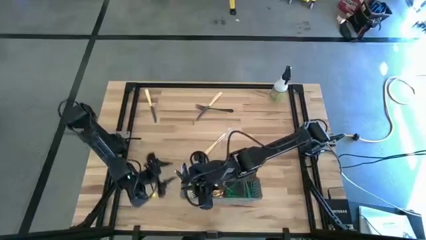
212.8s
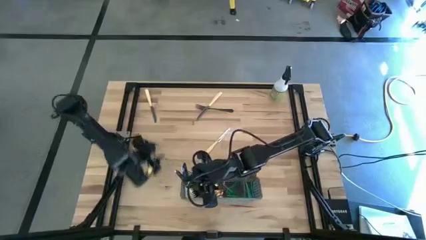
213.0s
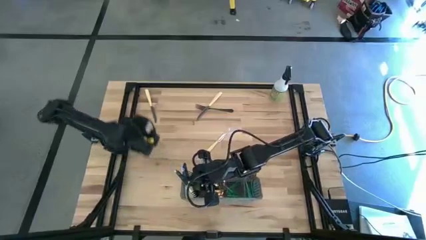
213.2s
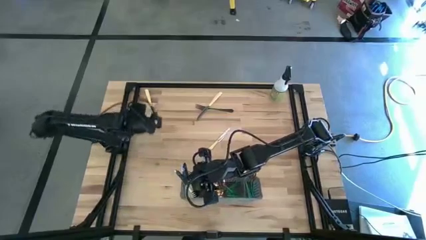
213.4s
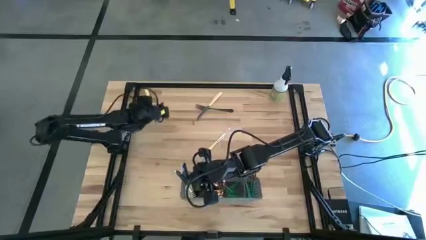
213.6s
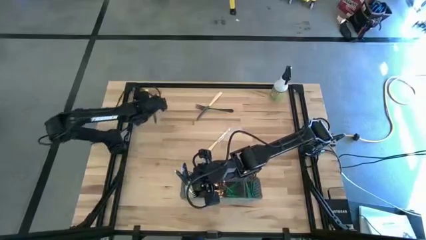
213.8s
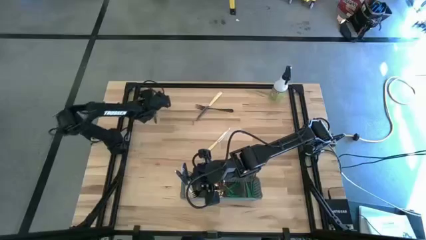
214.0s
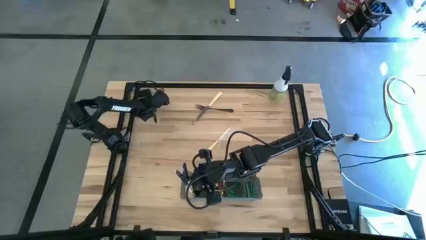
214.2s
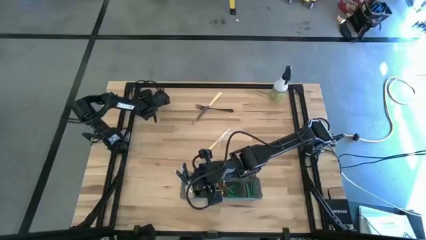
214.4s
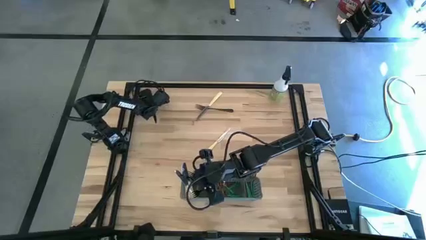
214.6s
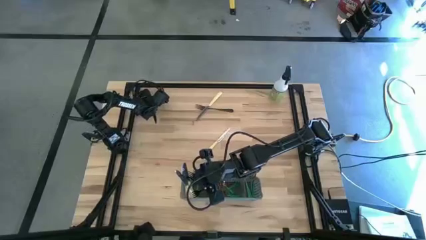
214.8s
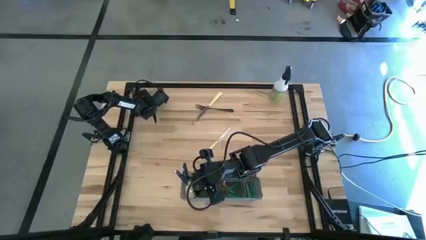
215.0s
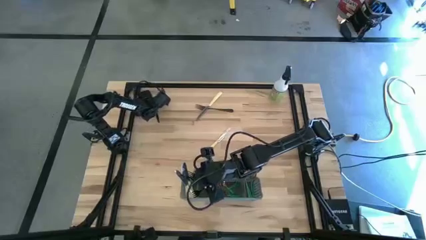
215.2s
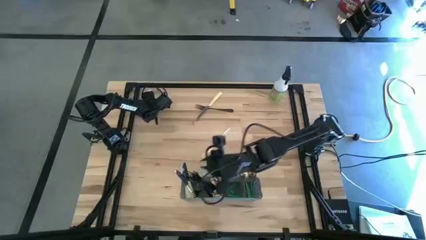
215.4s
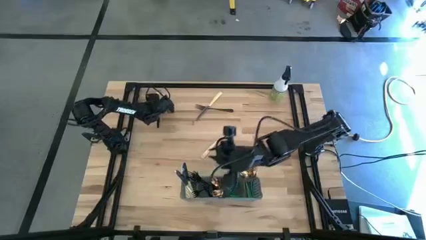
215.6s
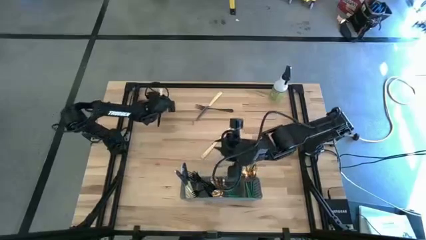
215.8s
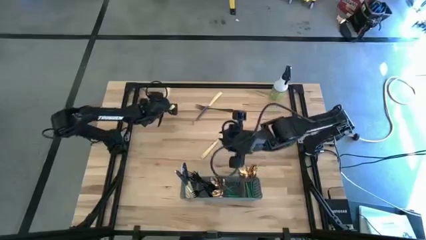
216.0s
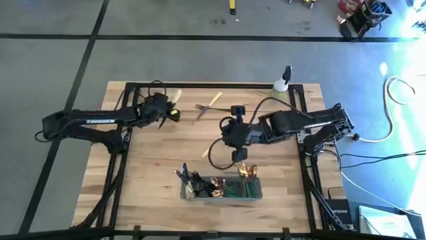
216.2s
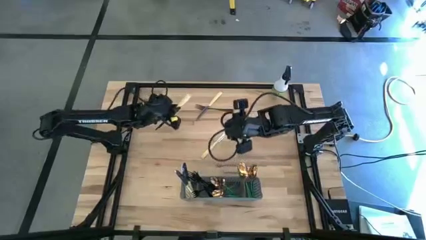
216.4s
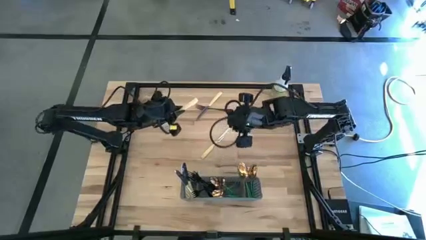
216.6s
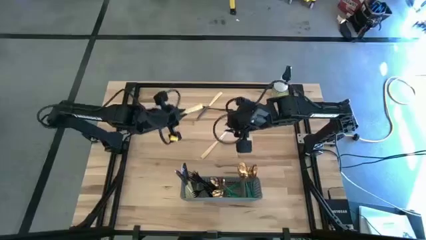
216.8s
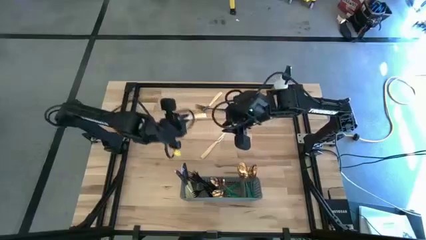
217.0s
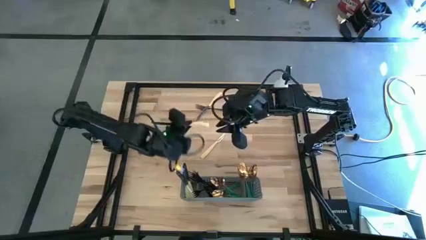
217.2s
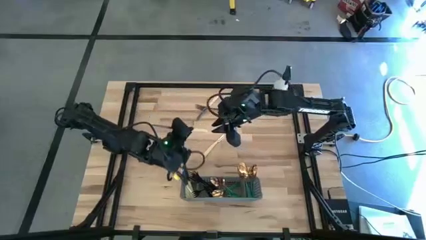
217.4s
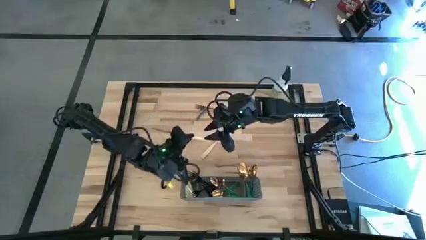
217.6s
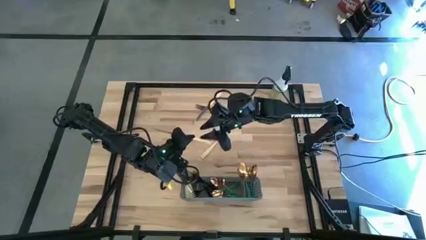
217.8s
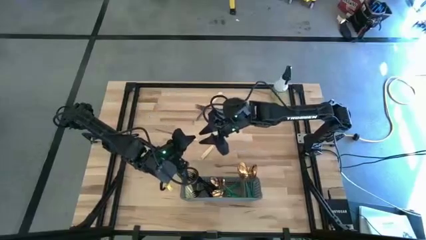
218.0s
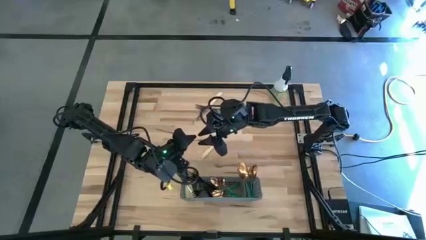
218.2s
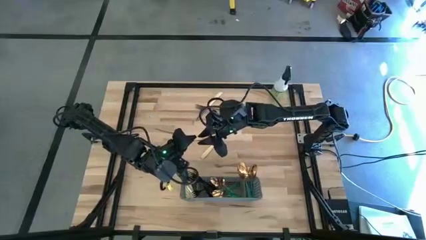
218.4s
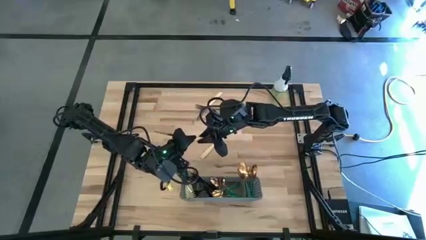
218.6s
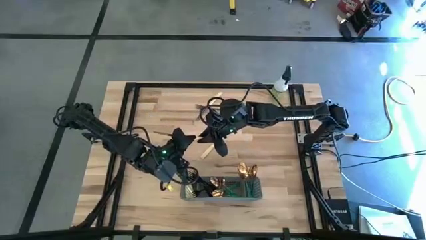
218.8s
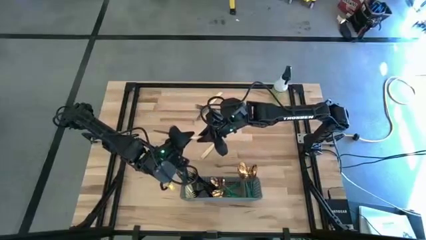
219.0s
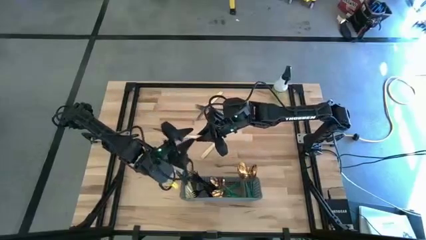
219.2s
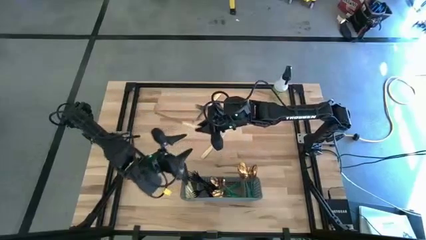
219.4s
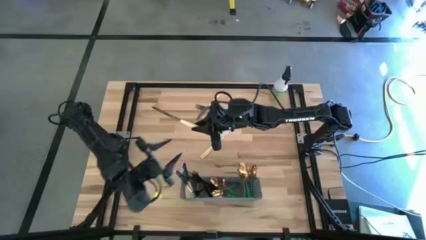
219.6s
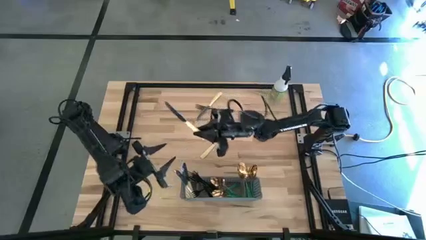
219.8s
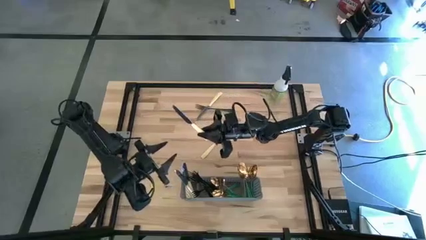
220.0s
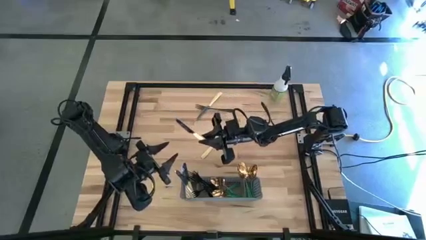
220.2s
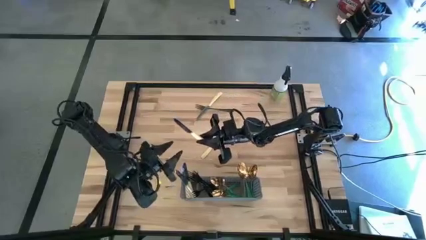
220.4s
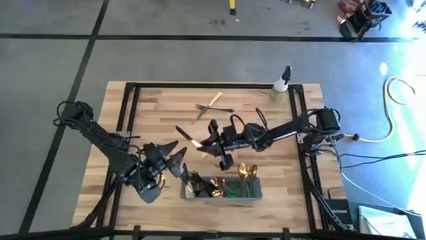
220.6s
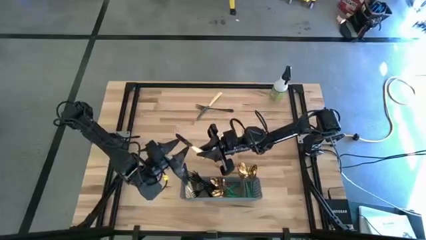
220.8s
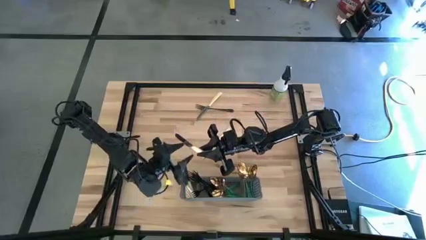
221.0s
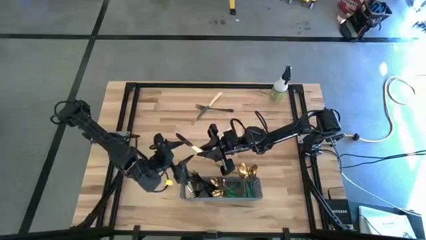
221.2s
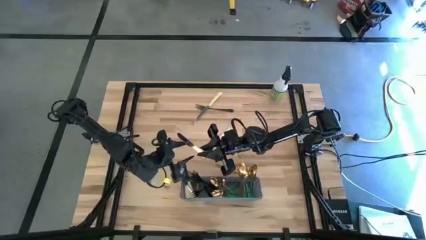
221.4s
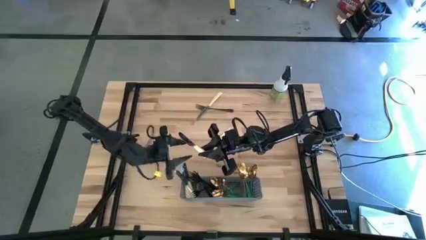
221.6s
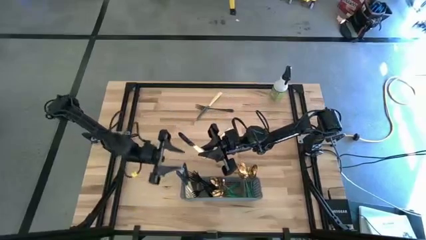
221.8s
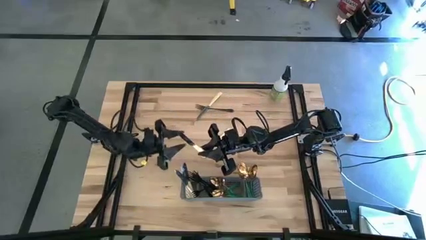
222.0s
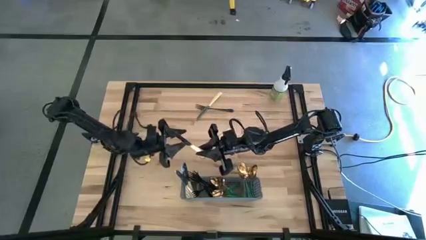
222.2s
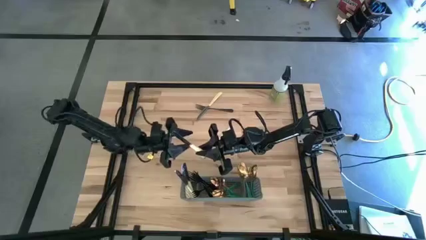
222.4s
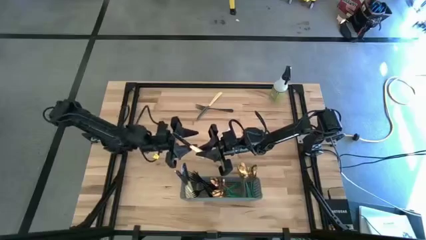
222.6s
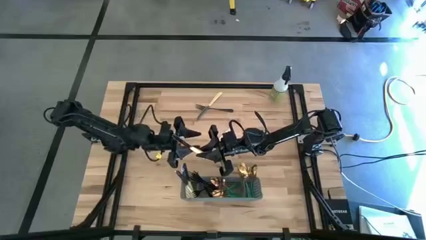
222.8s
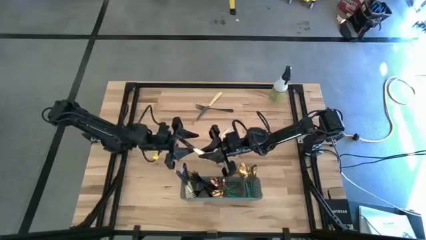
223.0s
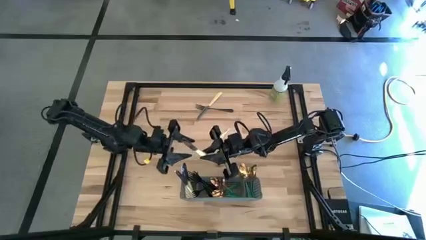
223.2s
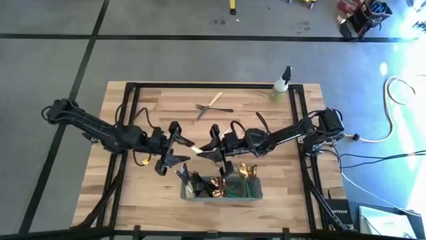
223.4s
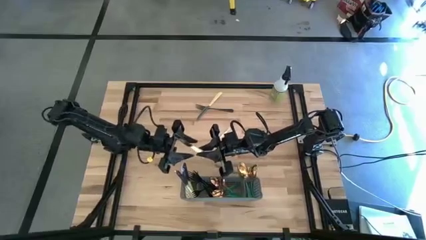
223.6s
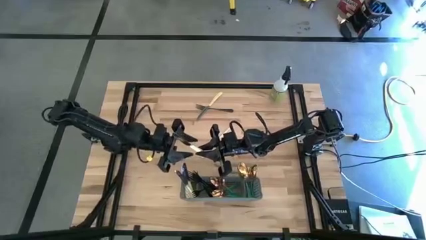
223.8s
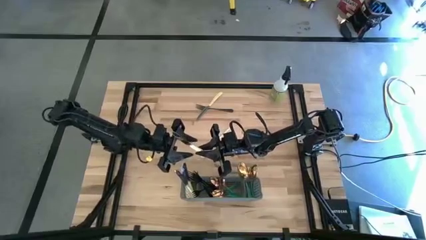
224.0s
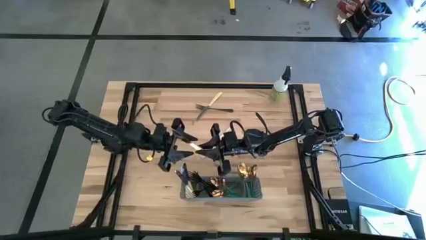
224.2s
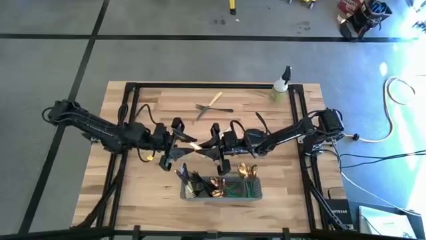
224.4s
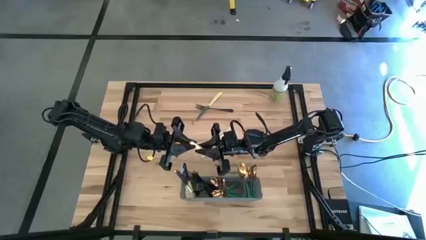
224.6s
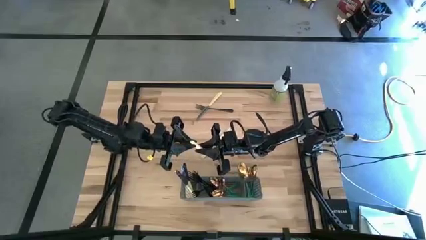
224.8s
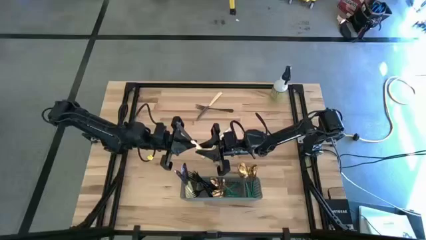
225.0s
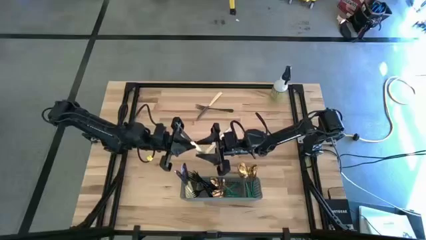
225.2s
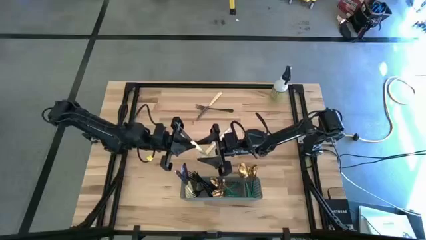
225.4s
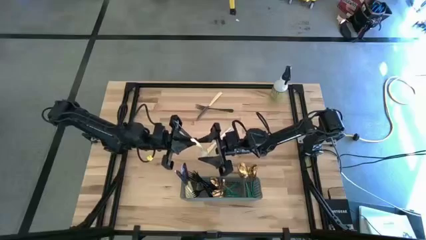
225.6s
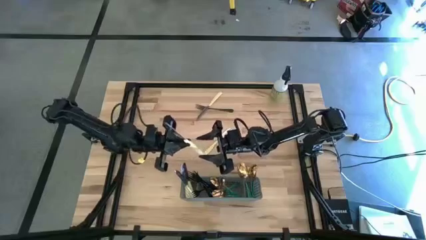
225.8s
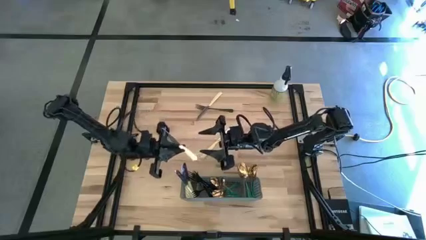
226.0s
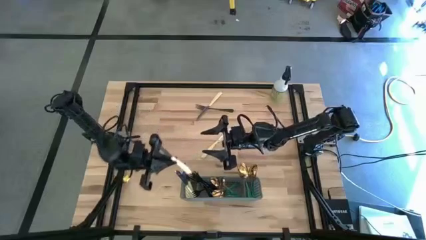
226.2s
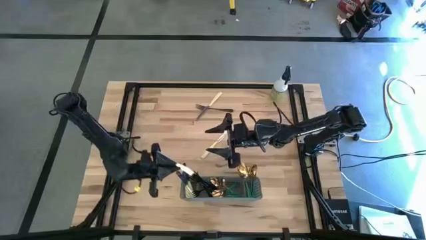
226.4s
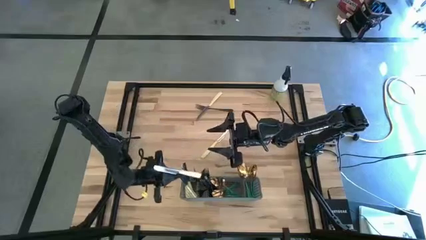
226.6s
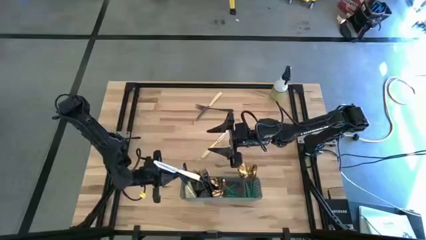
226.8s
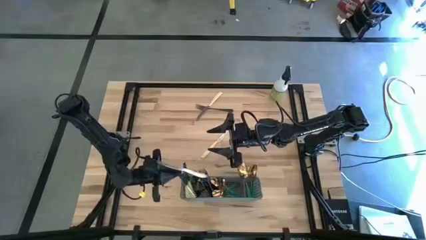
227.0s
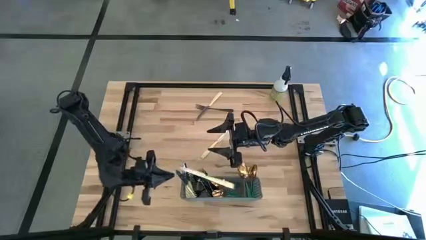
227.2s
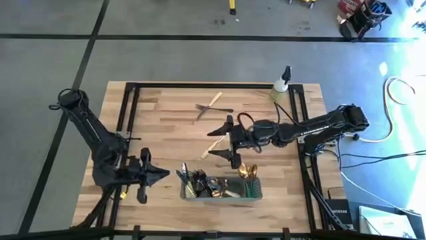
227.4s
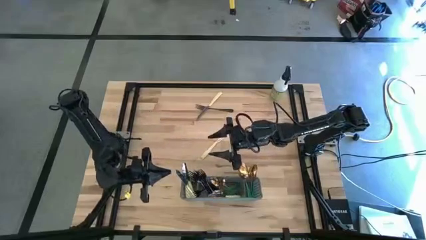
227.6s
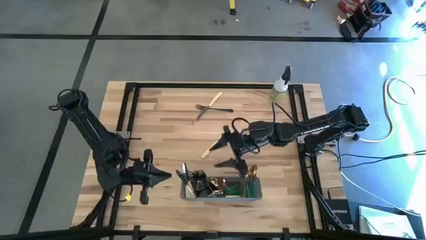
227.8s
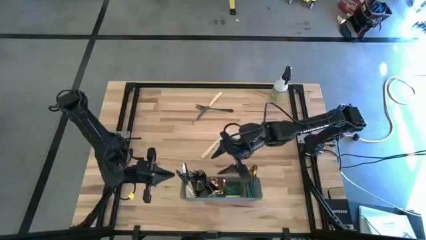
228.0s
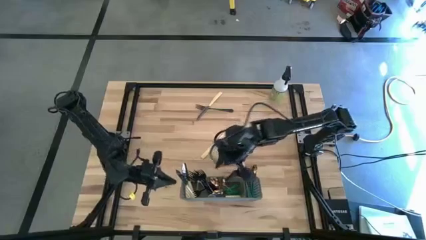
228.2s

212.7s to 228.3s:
Task: Sort silverware
Put the left yellow knife into the gray cutlery rack
